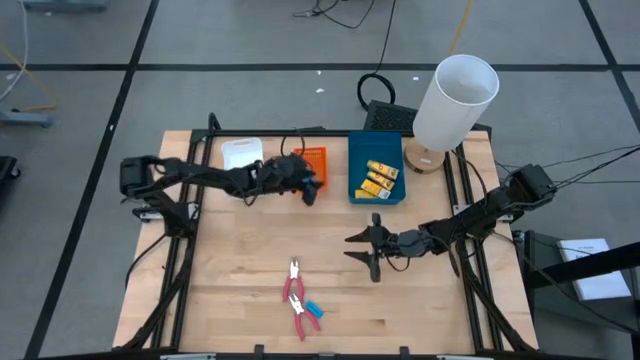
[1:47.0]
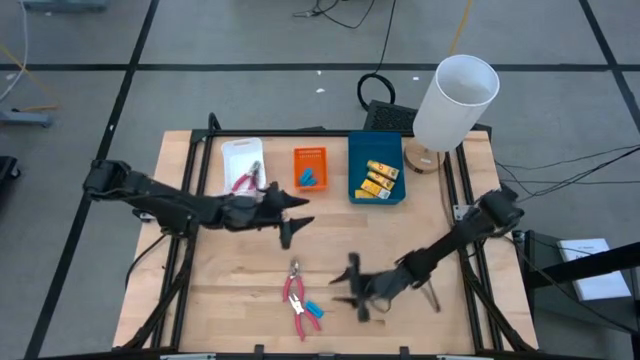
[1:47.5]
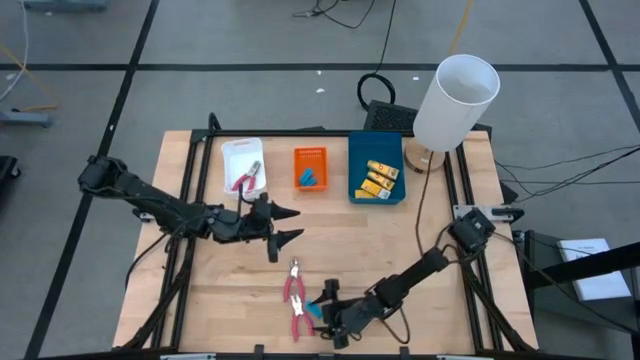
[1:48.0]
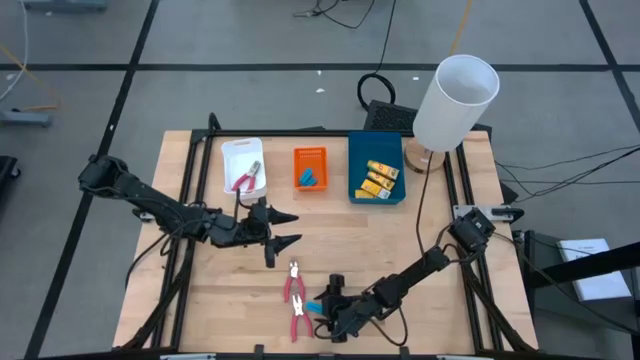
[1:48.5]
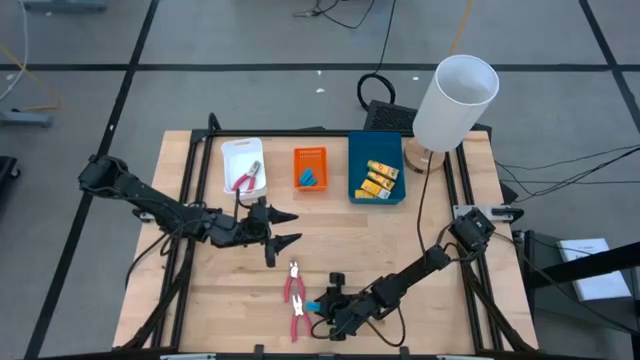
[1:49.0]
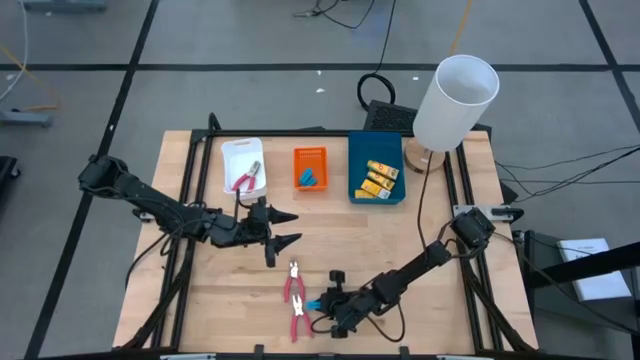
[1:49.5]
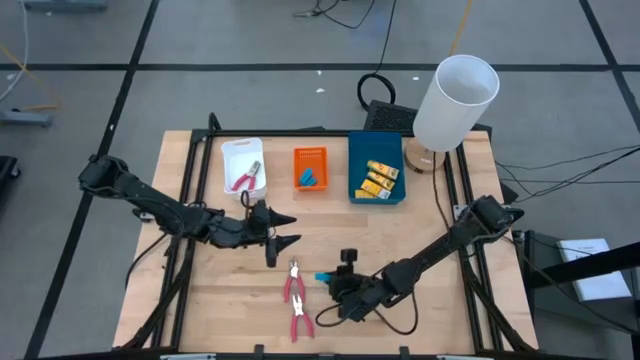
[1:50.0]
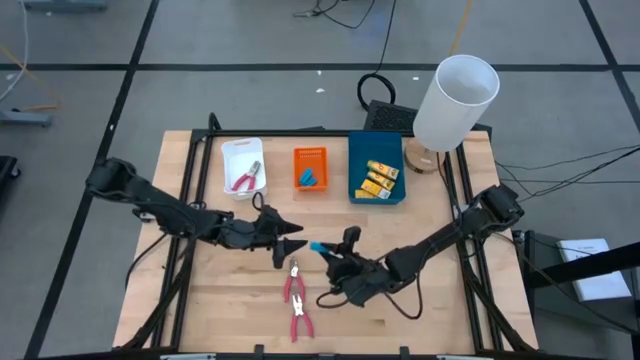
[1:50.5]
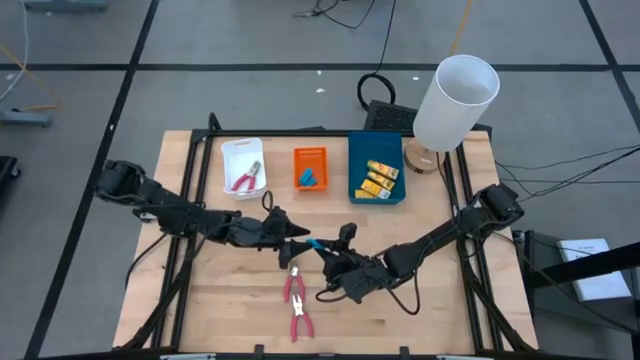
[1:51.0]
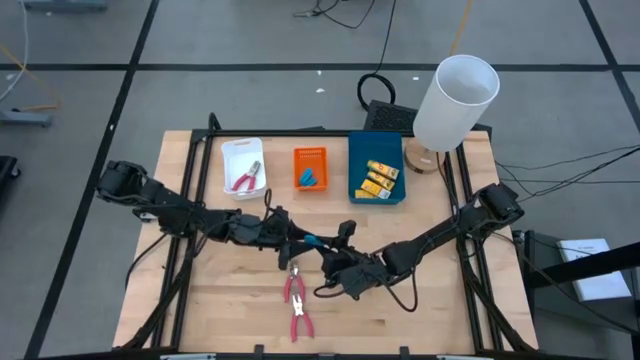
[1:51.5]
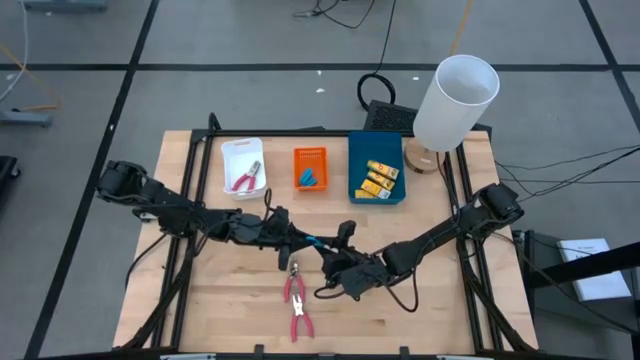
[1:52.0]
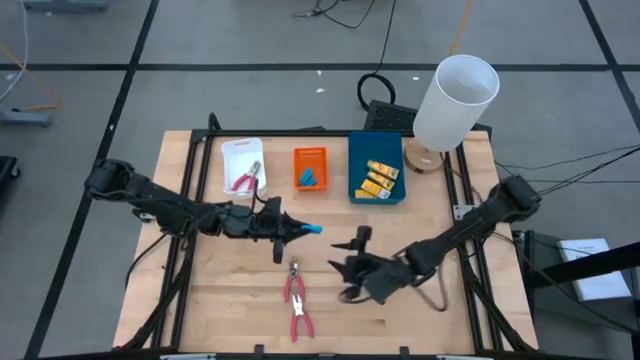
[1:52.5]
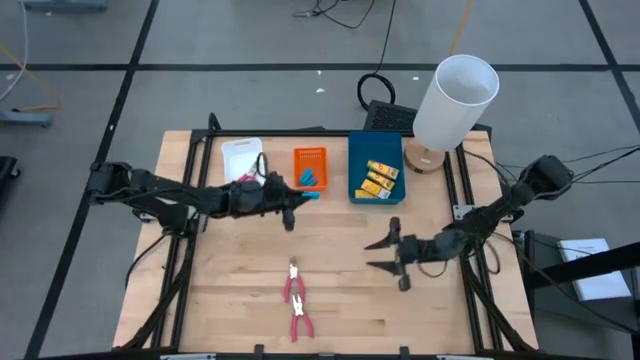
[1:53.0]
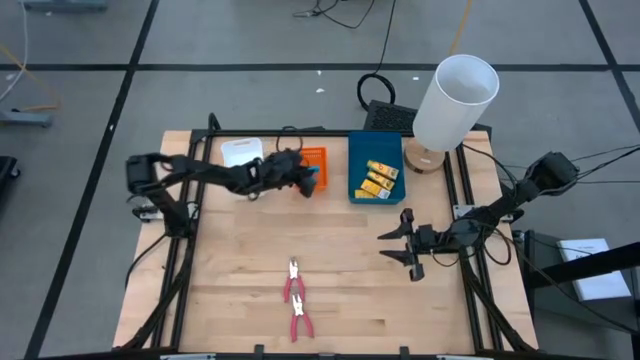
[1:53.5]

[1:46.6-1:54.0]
Task: Pick & Place School Supplies
Put the eraser into the orange bin

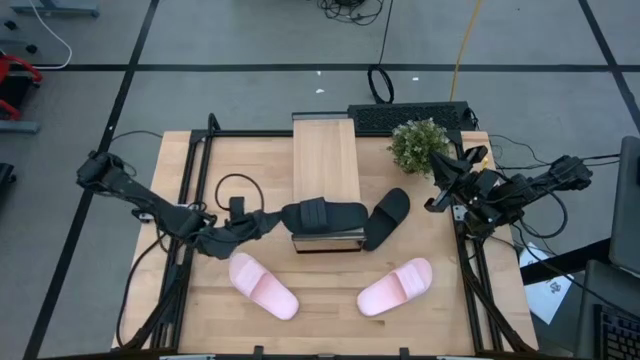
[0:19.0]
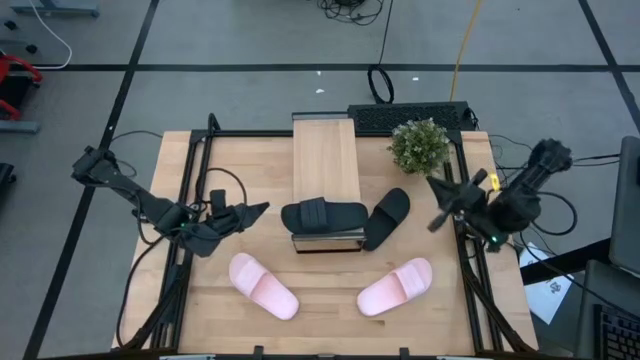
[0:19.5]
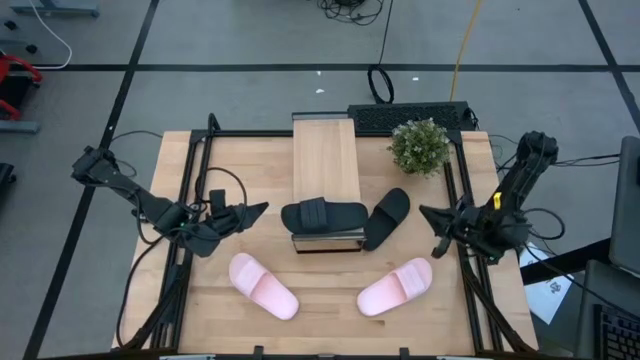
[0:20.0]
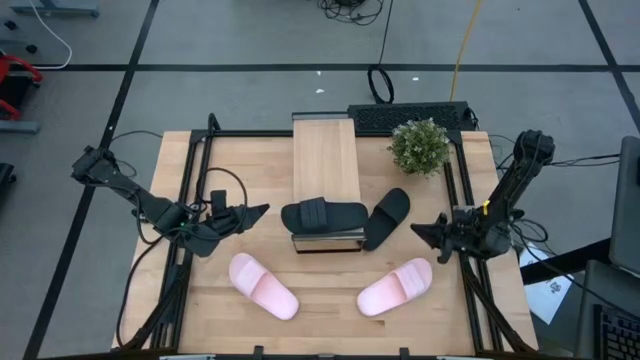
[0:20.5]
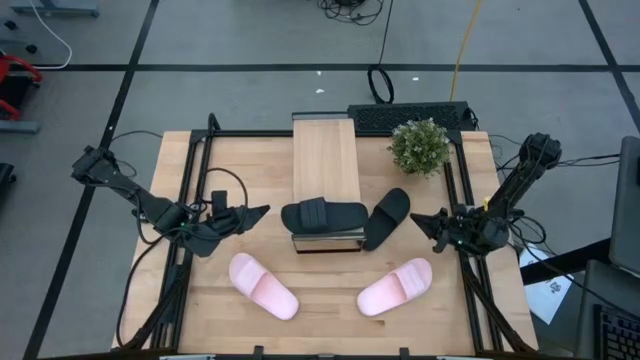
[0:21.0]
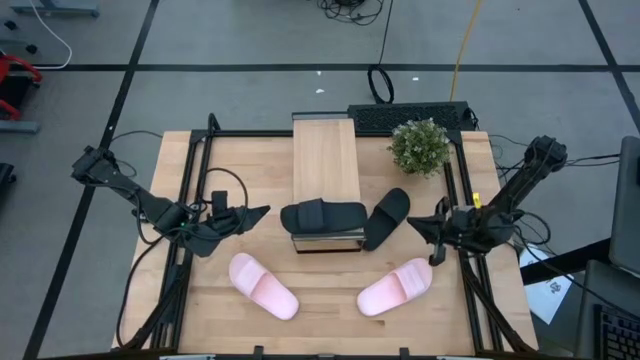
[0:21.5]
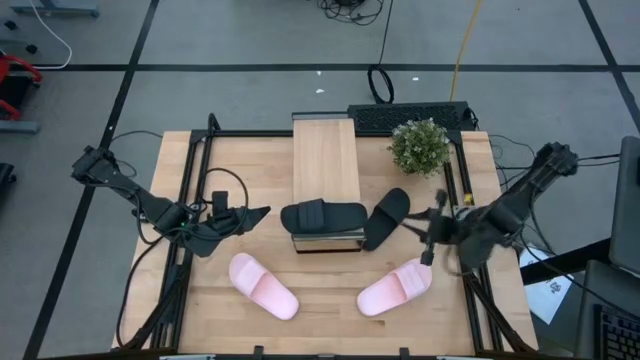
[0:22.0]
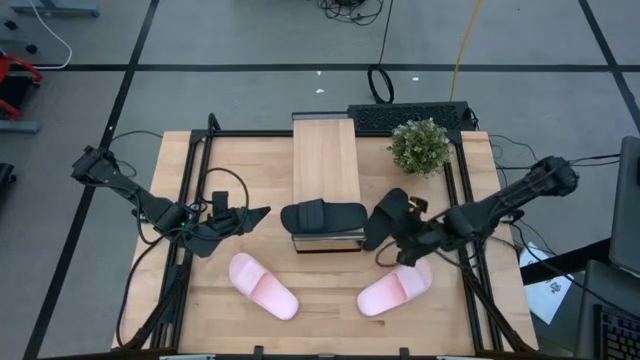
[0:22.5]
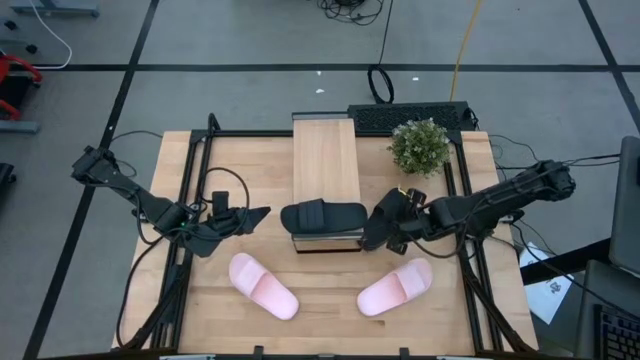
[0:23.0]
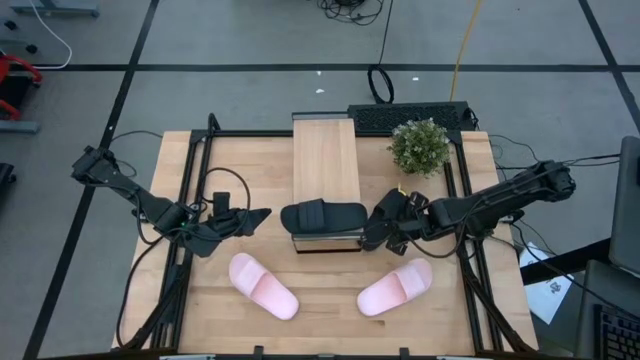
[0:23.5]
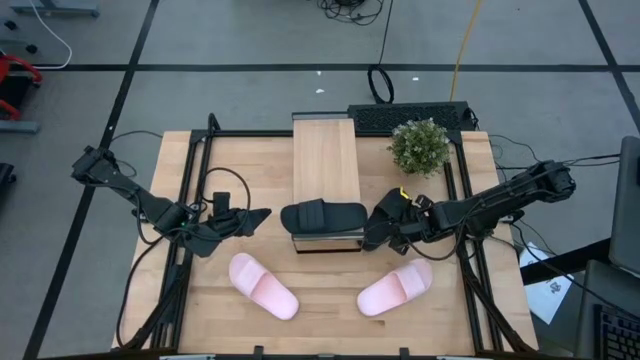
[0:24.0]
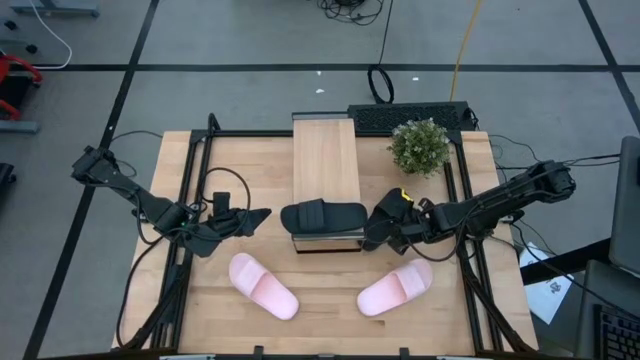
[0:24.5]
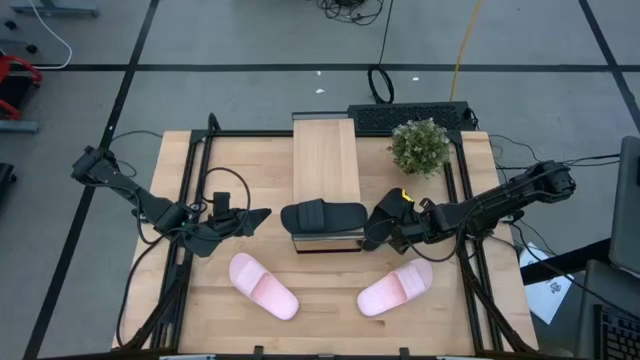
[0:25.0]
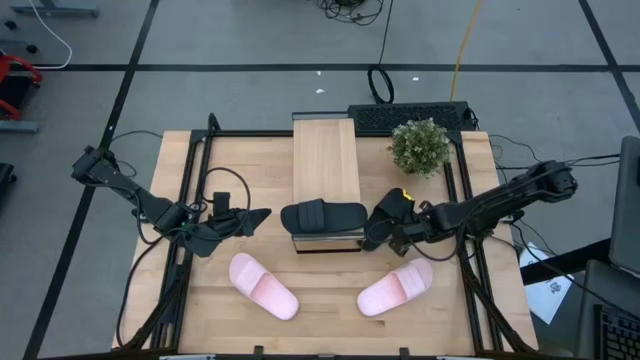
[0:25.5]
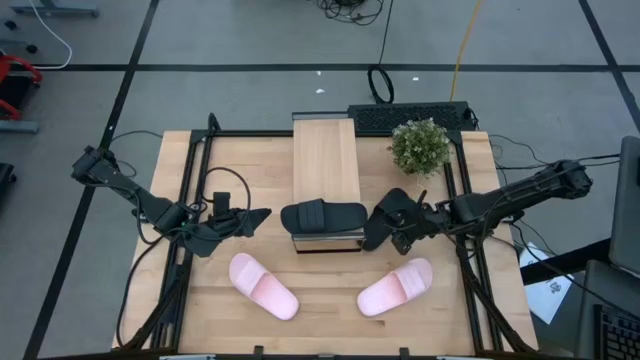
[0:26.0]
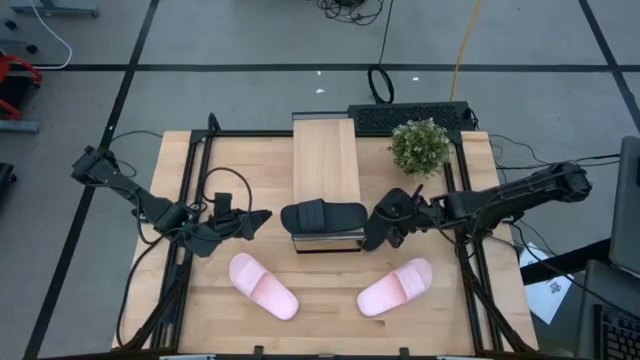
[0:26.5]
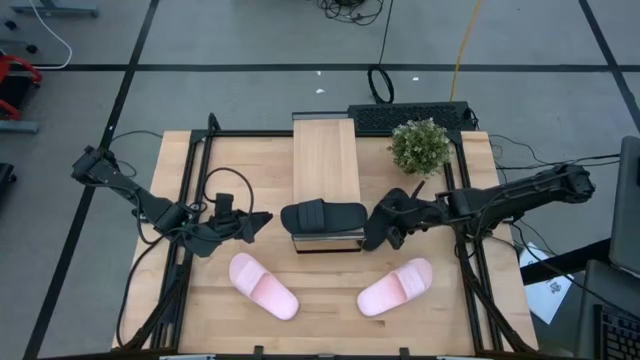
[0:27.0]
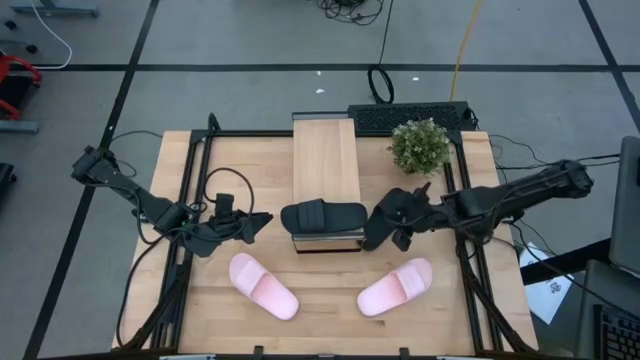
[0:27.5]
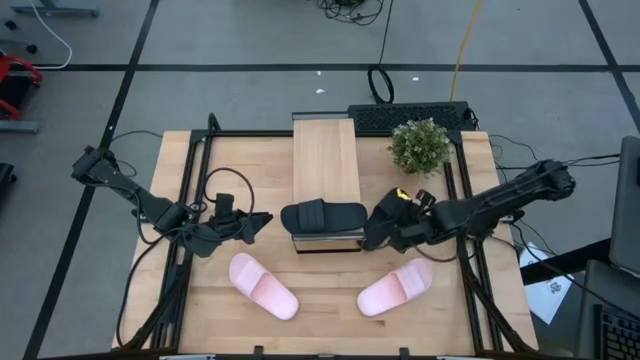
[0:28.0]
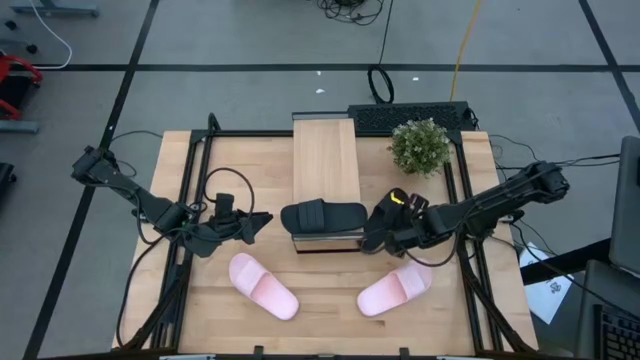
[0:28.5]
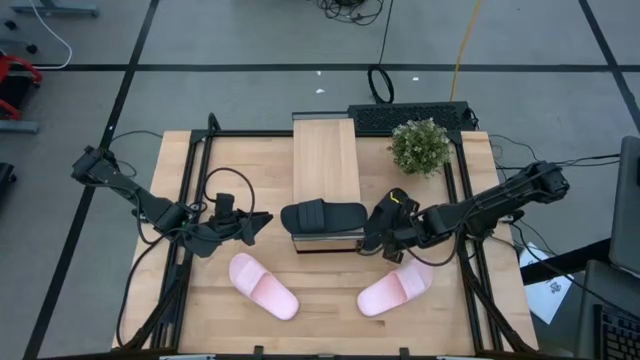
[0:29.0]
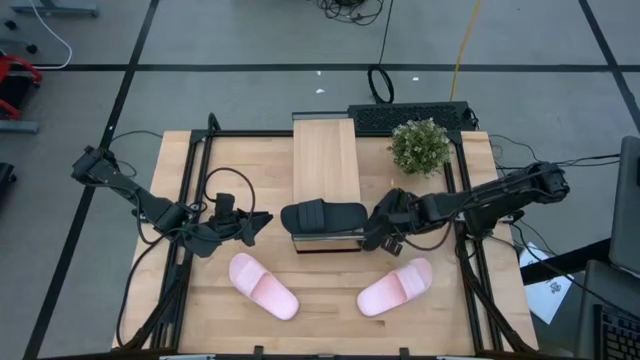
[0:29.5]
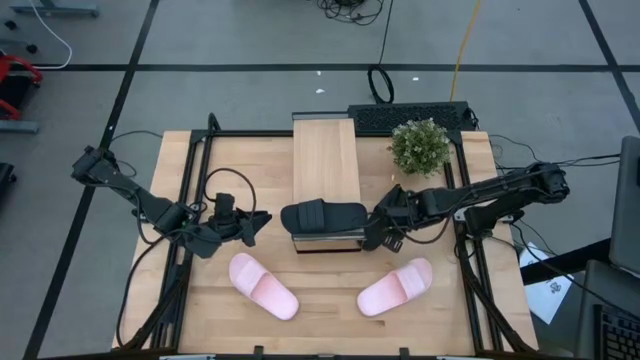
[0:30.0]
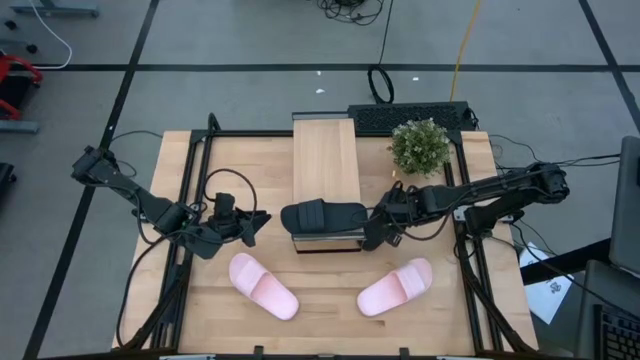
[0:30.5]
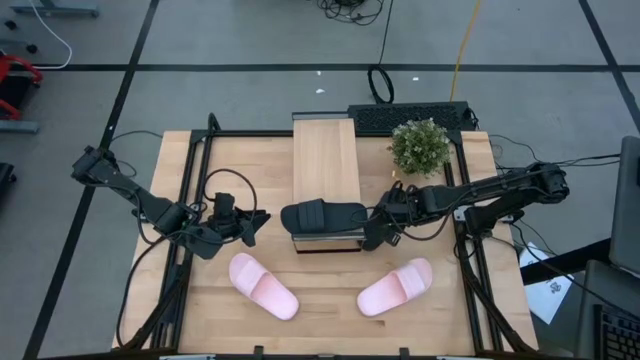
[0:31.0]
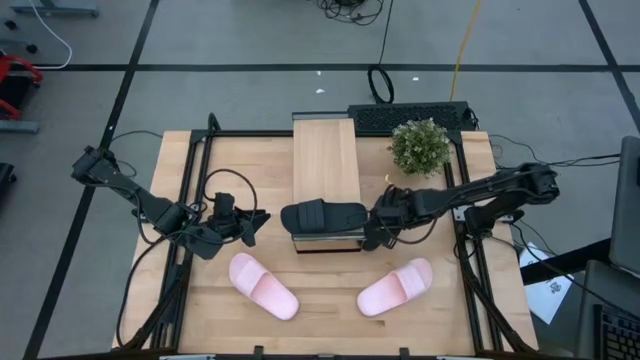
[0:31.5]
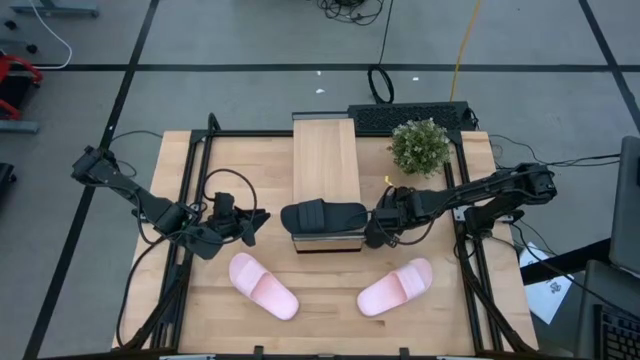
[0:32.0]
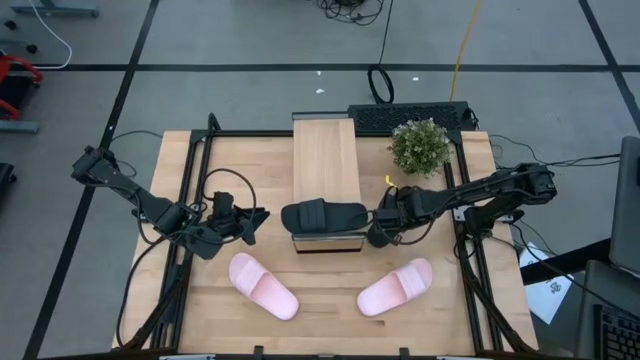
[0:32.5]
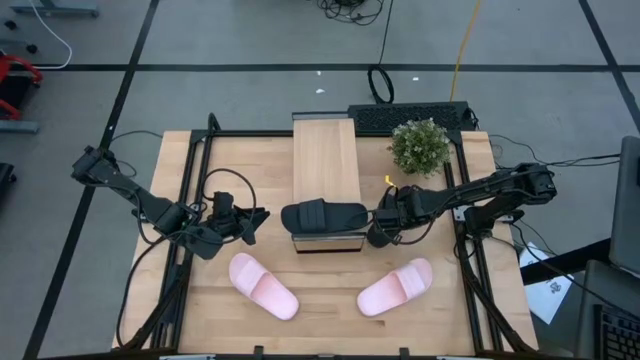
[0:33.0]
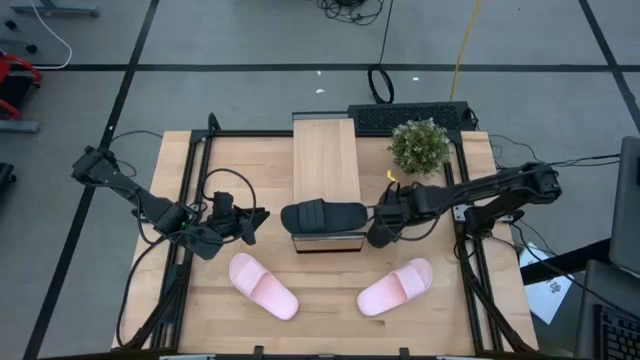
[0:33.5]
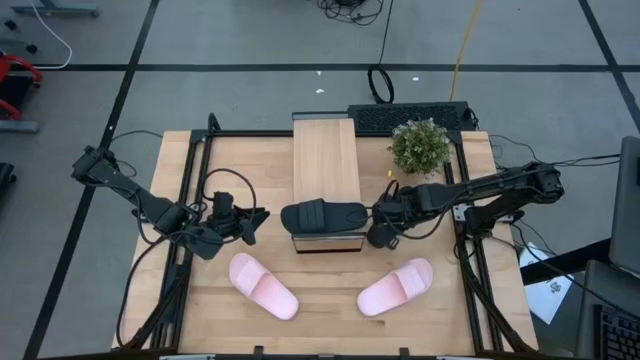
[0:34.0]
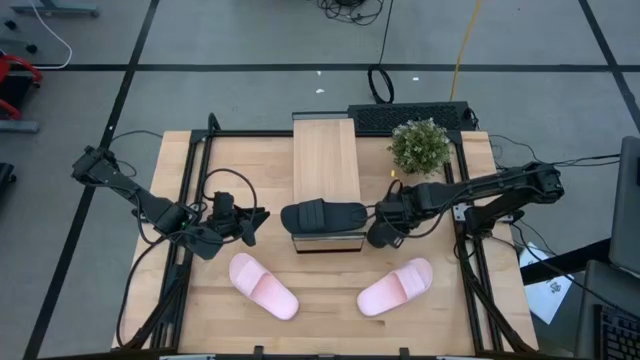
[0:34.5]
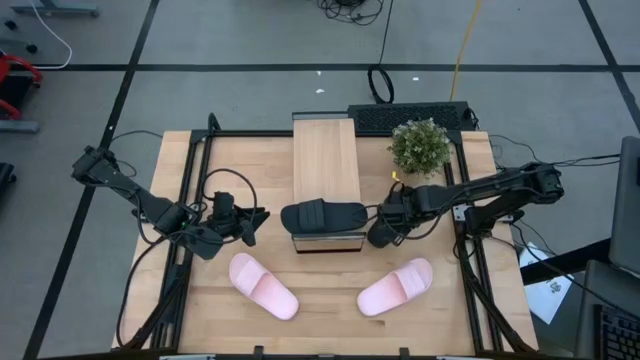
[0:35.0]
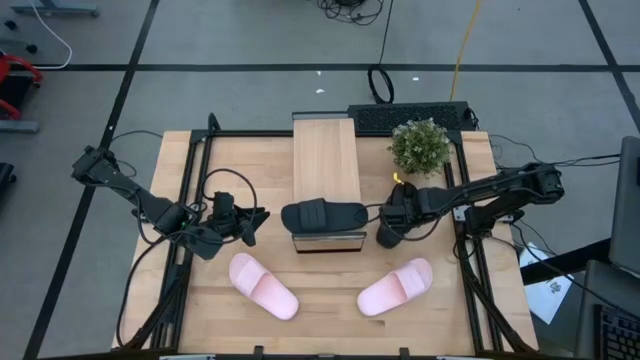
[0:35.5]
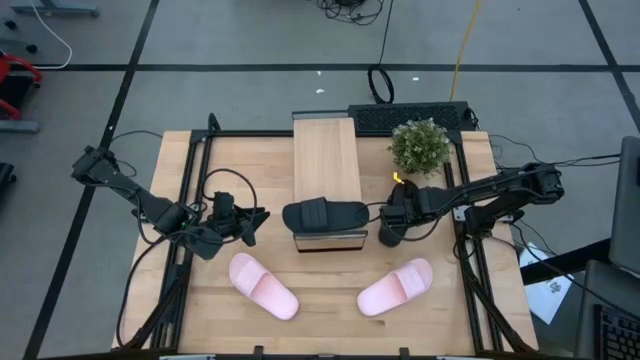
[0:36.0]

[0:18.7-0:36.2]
Task: Pick and place slides into the shelf
Put the black slide on the shelf
